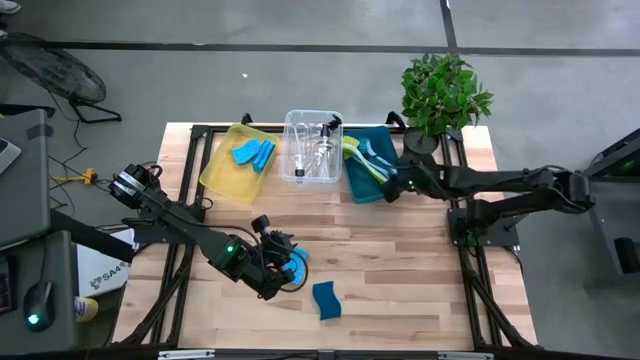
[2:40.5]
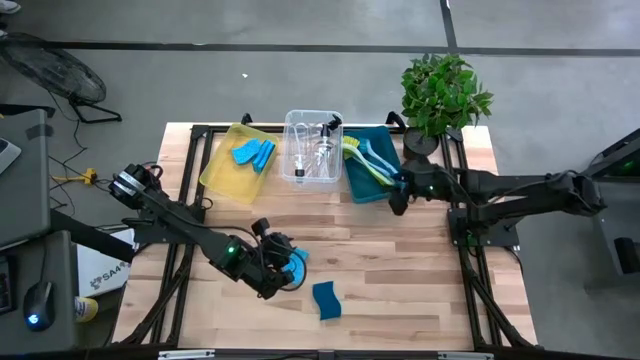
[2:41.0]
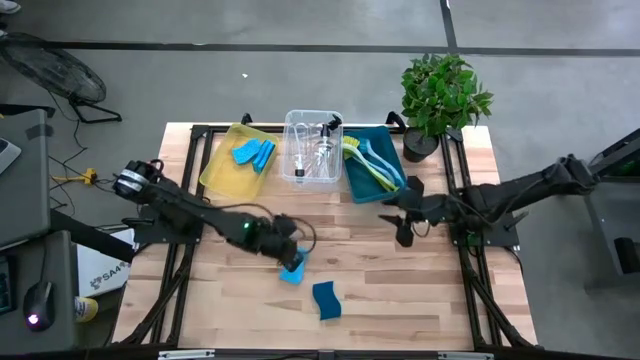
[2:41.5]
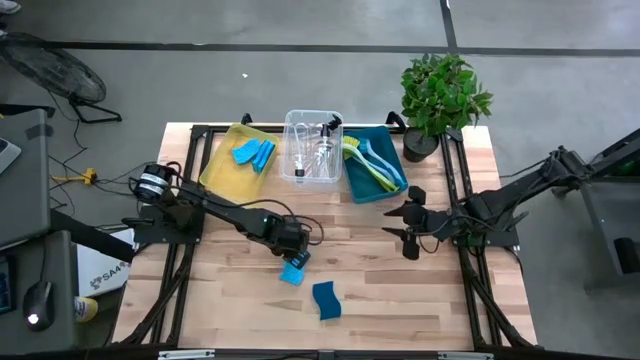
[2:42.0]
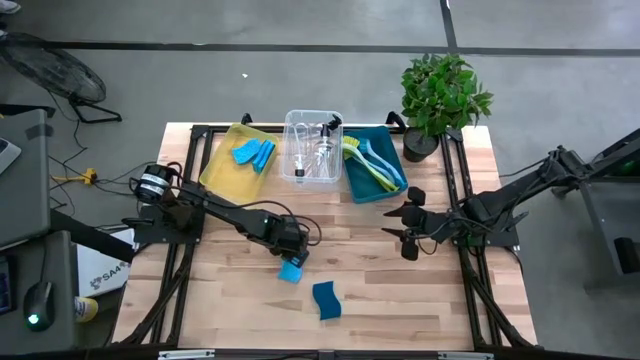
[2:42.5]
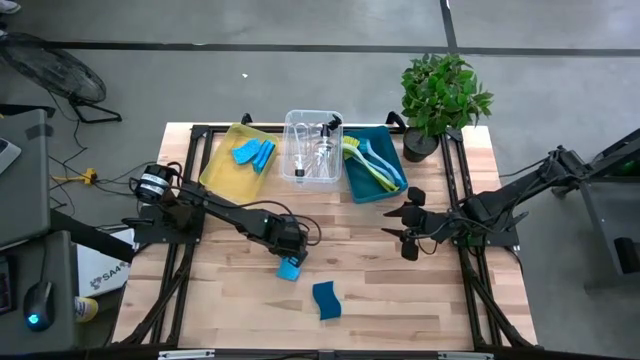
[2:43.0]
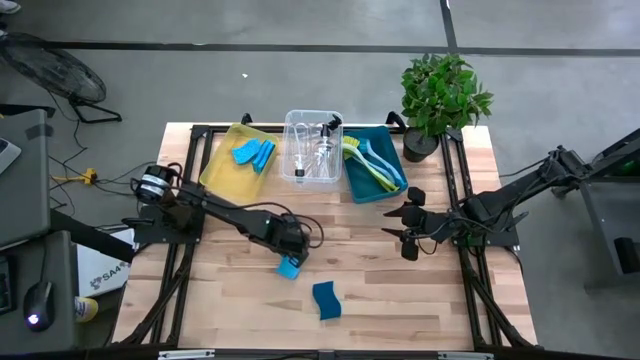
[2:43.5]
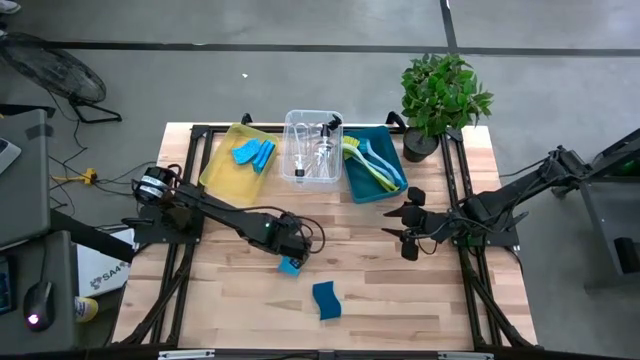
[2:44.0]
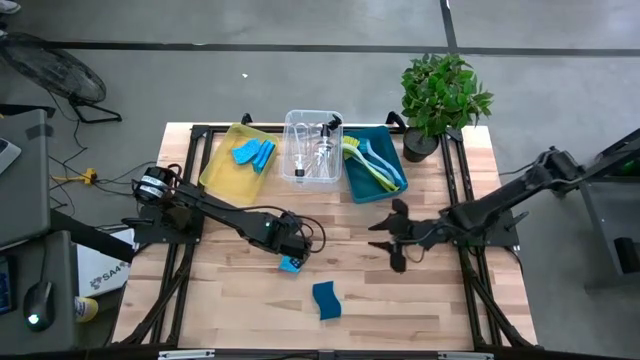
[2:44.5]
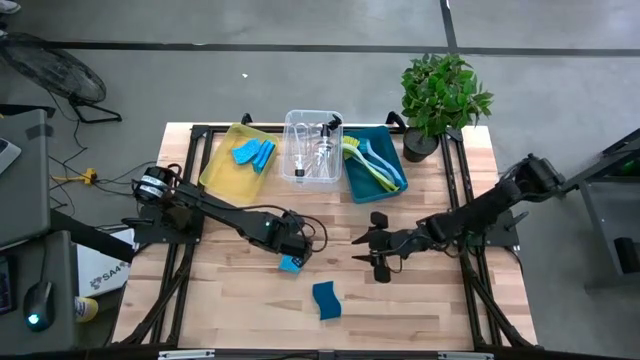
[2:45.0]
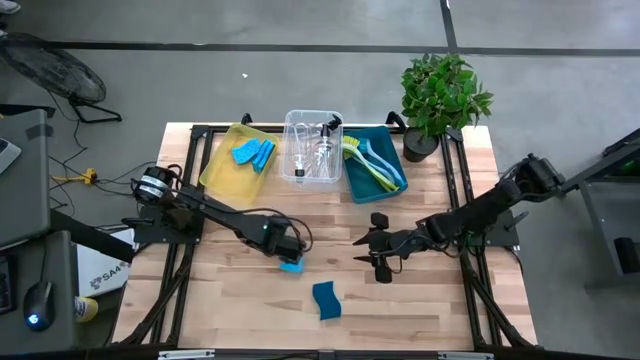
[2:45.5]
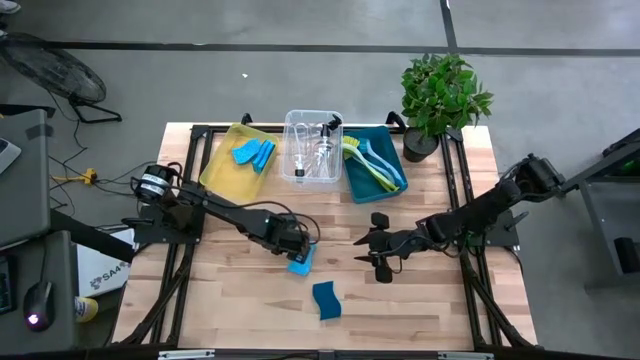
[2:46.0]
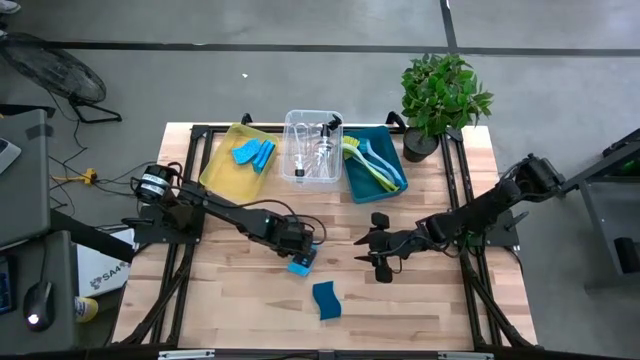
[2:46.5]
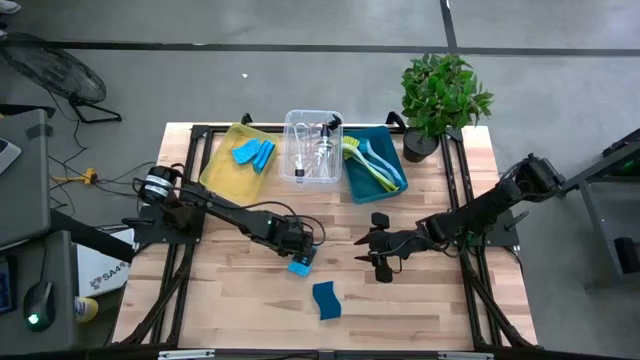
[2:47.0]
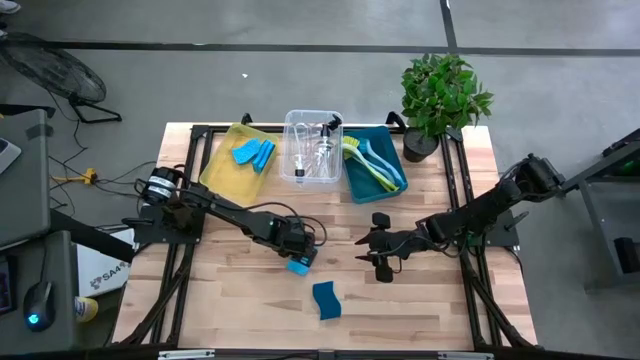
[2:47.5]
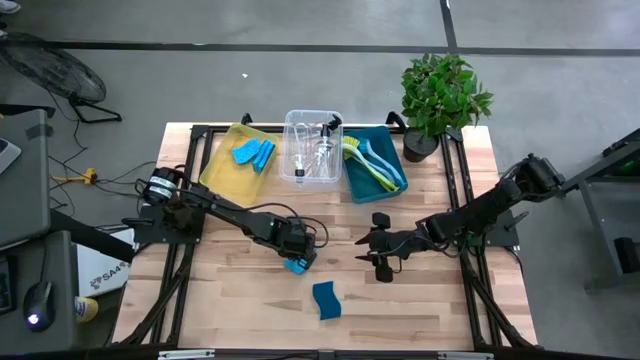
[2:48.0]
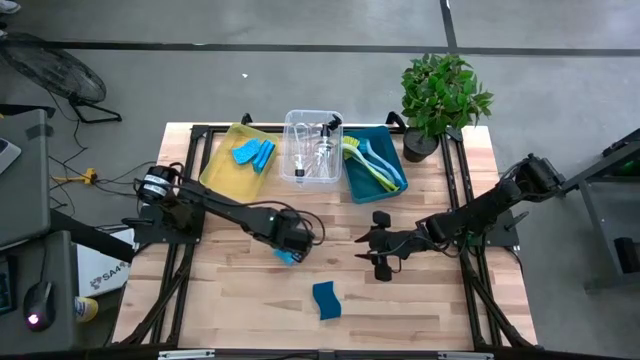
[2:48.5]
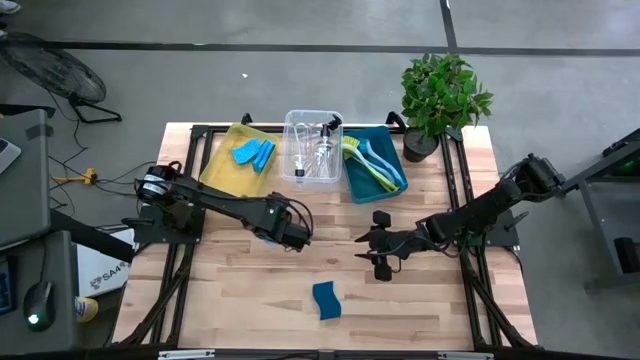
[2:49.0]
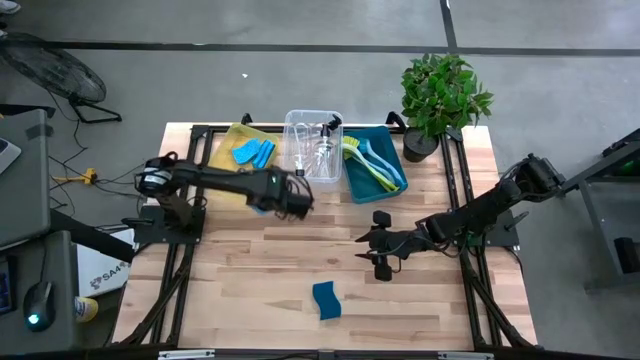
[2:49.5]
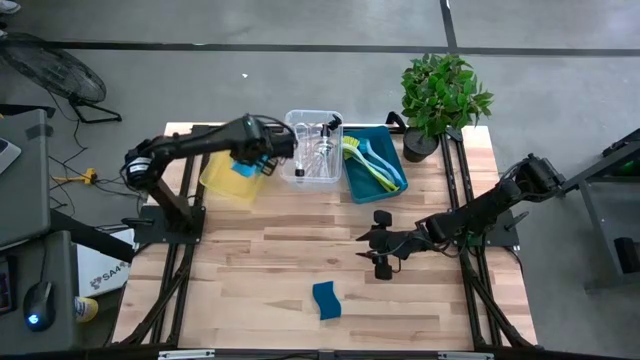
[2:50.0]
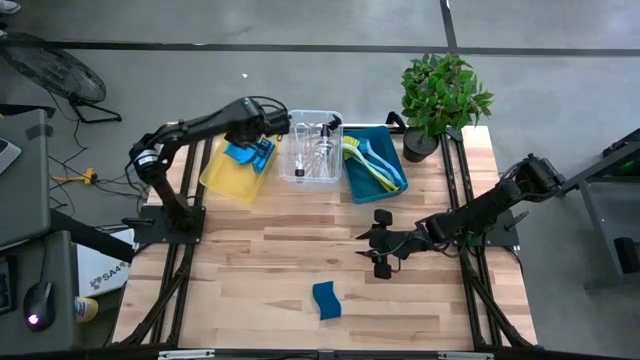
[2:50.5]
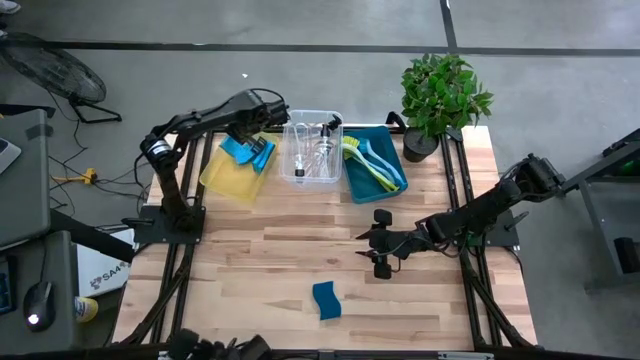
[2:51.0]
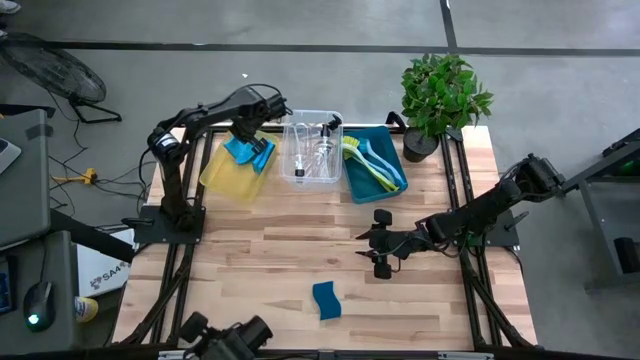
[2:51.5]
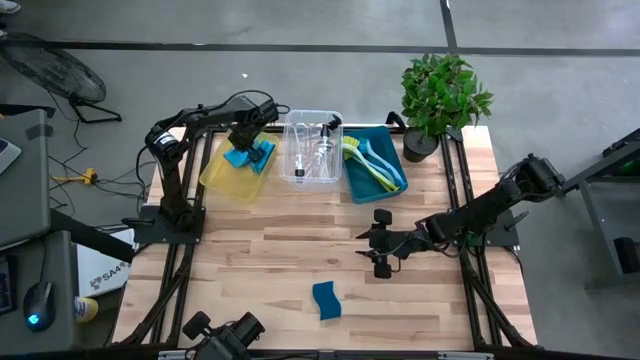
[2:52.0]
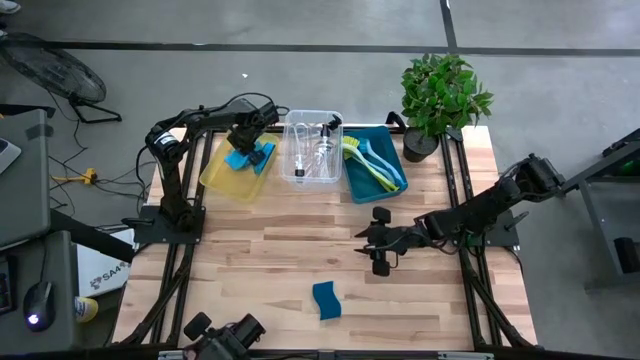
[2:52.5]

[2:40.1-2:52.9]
Task: Pick & Place Kitchen Sink Supplies
Put the blue sponge into the yellow bin

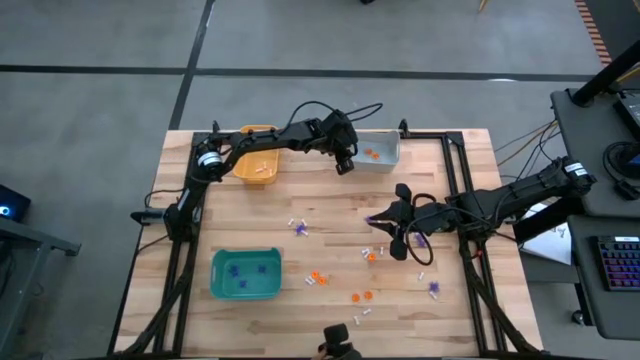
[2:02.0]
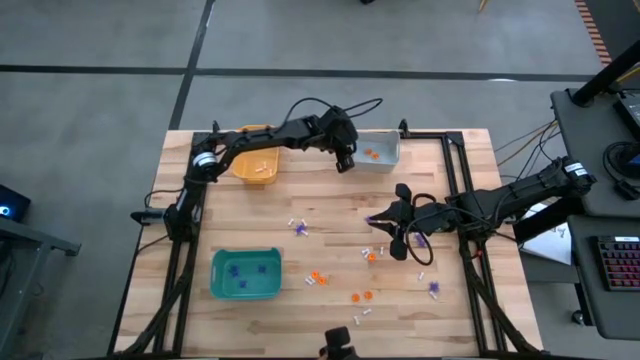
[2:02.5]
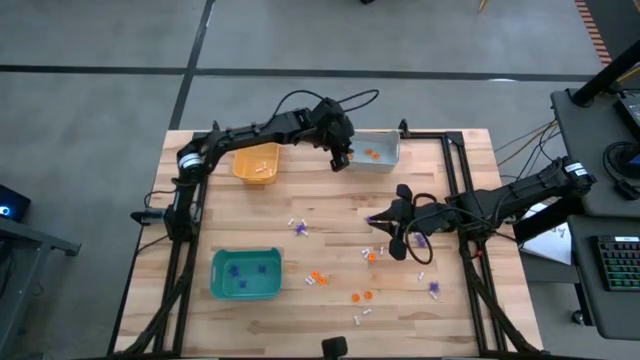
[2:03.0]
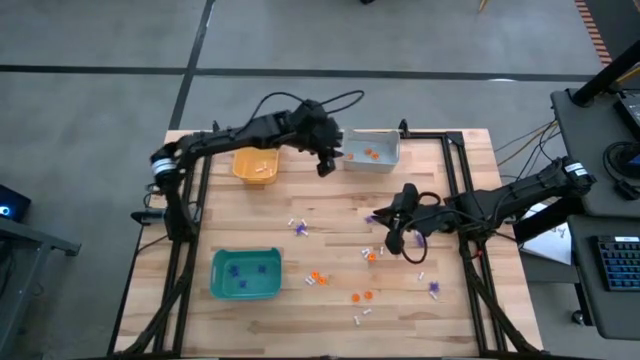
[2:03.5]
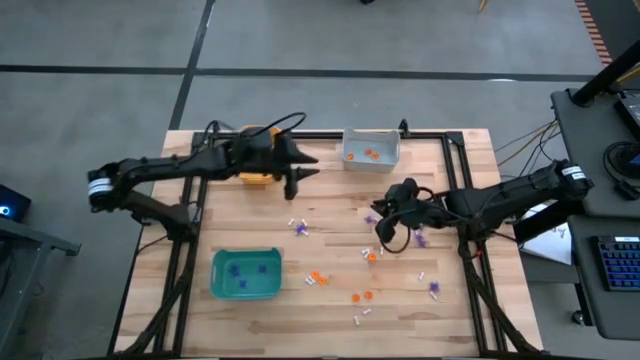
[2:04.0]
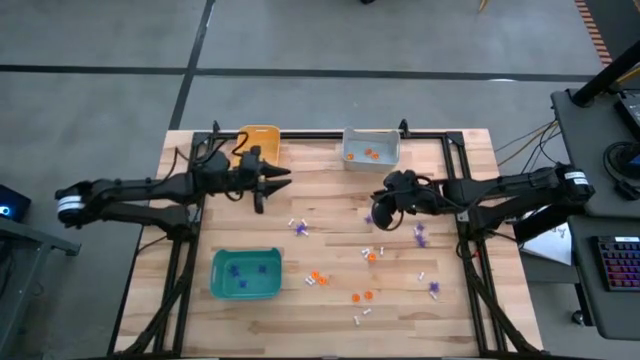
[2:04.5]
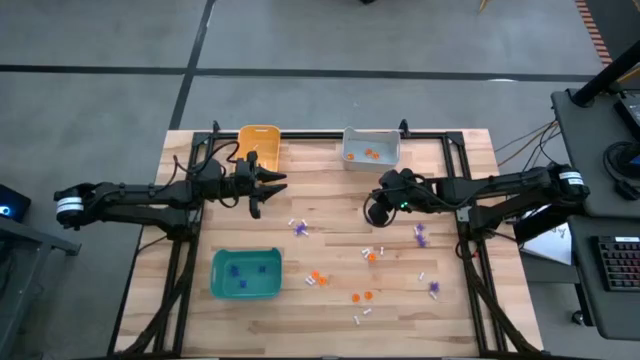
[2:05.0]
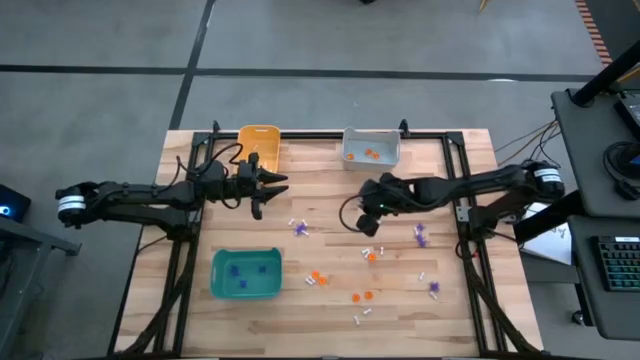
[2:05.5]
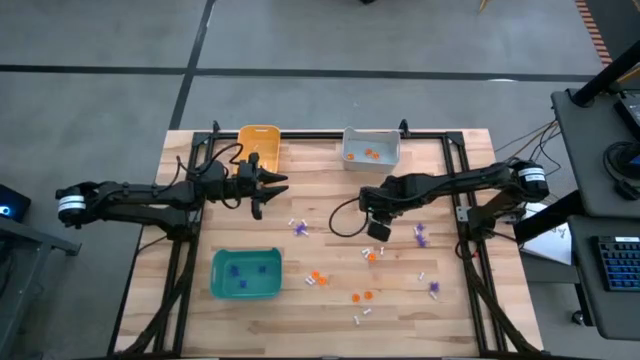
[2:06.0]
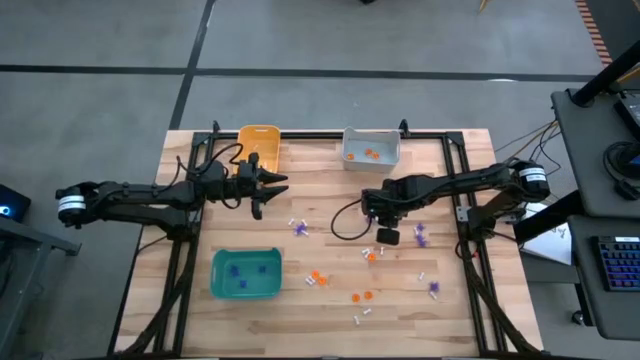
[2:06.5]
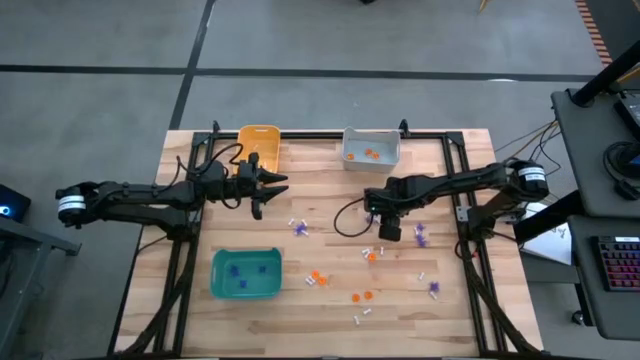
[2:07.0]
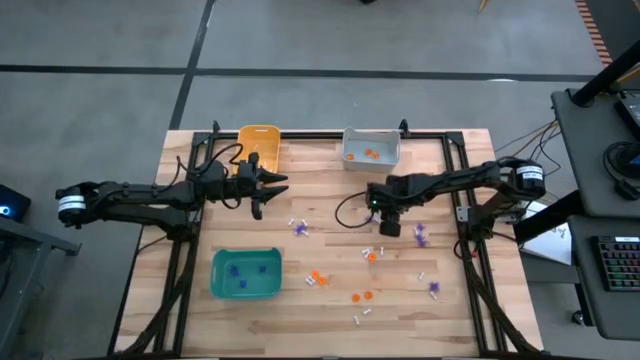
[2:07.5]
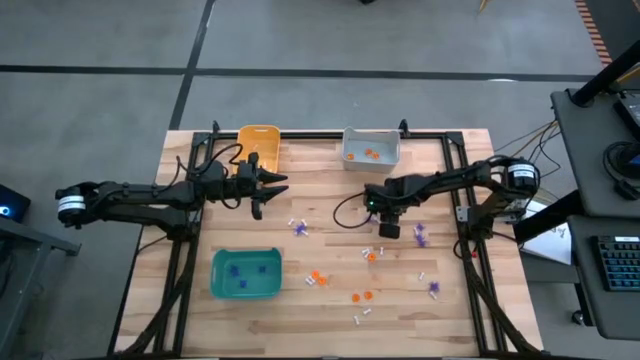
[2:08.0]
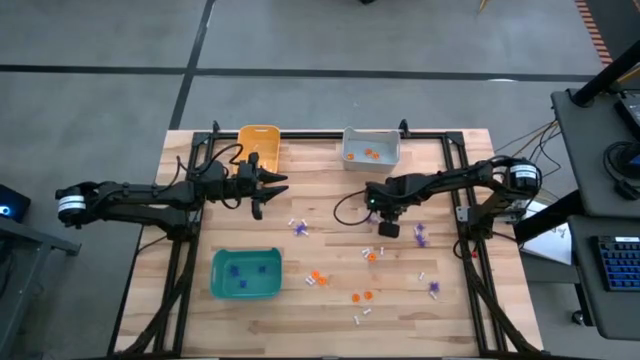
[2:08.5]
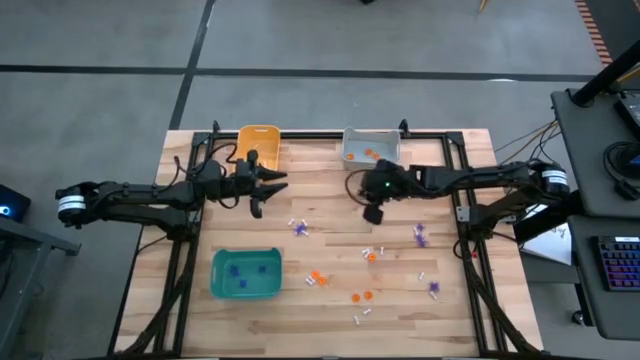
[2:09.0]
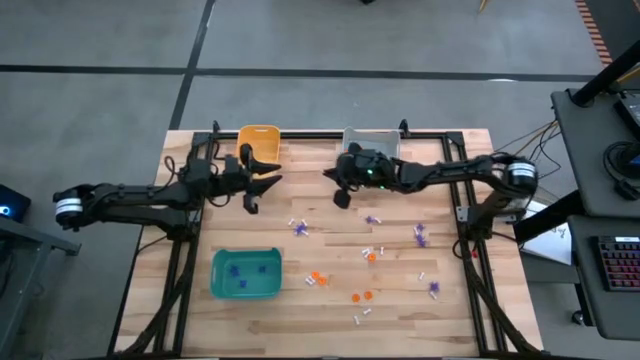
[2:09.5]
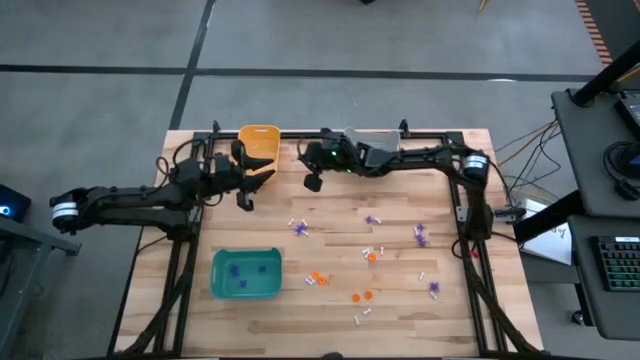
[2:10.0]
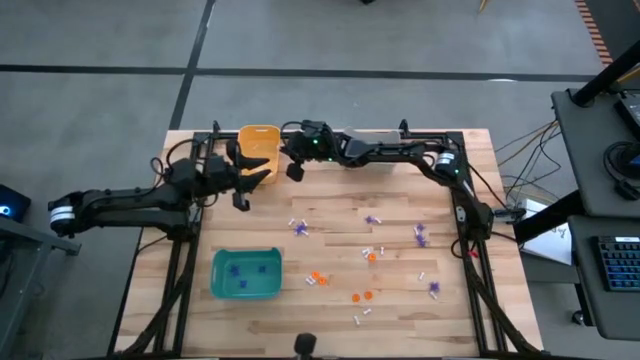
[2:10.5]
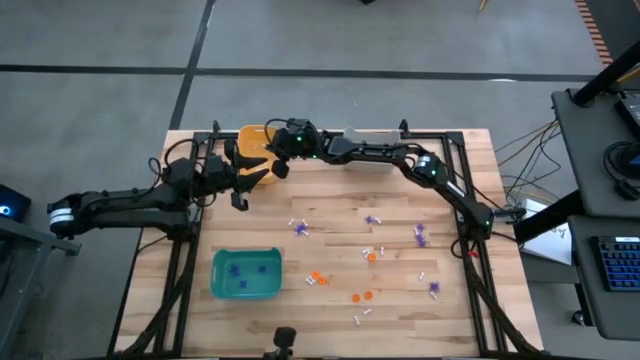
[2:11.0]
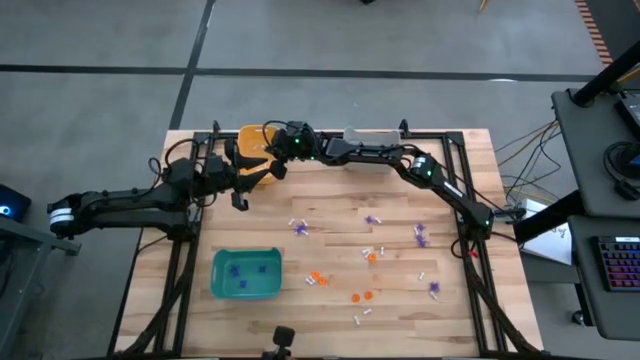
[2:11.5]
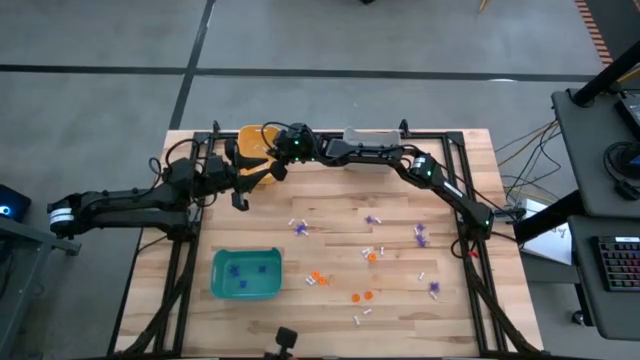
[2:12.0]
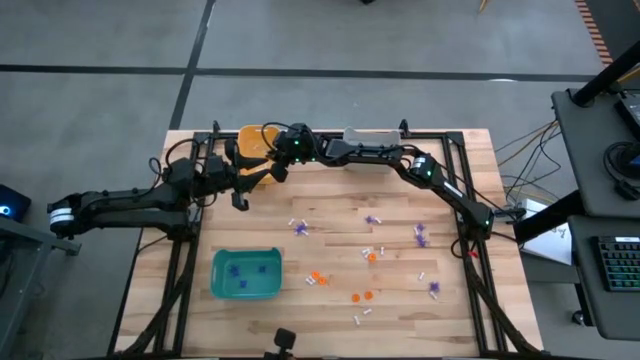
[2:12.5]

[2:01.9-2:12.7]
Task: Sort Halloween decoration
Put the white bone toy into the orange bin
